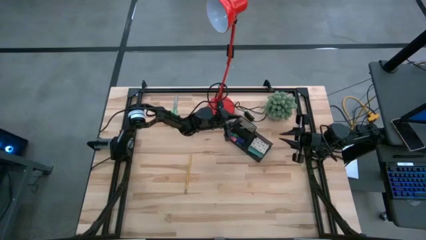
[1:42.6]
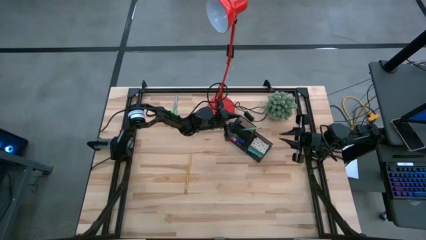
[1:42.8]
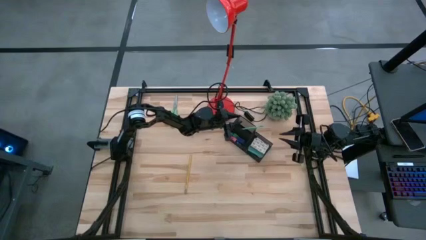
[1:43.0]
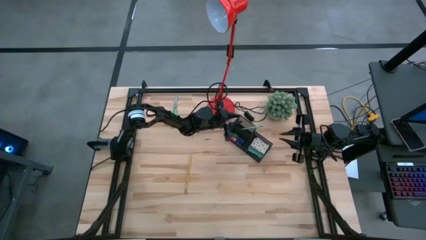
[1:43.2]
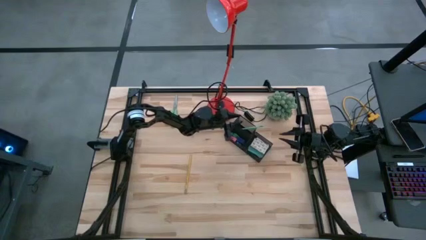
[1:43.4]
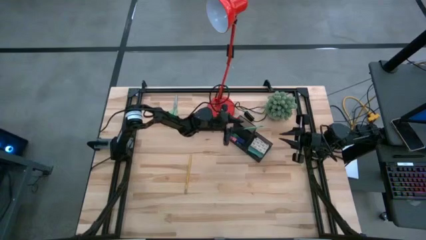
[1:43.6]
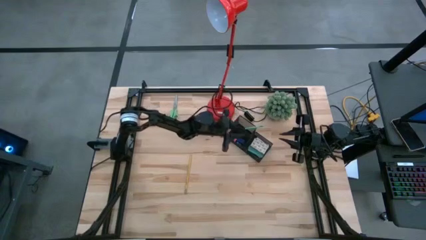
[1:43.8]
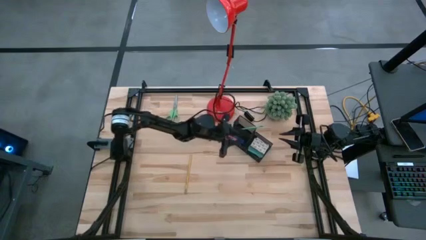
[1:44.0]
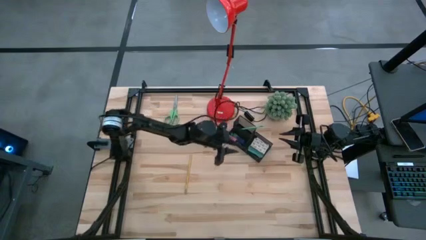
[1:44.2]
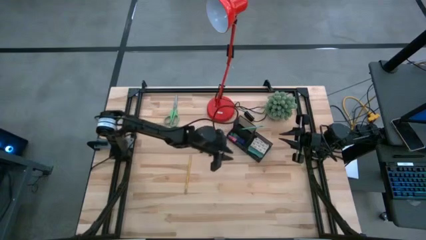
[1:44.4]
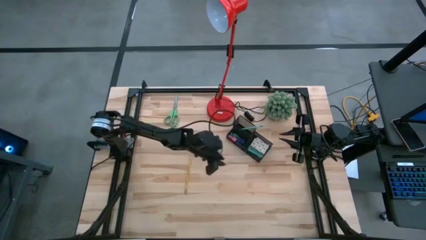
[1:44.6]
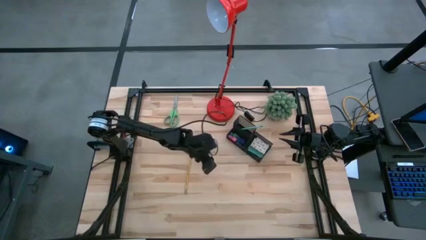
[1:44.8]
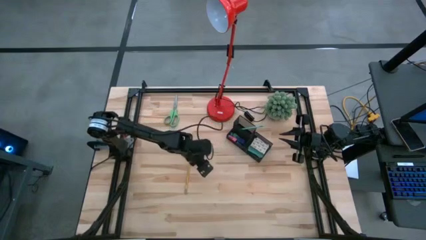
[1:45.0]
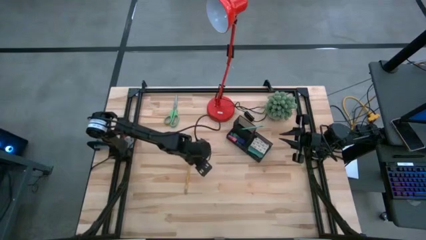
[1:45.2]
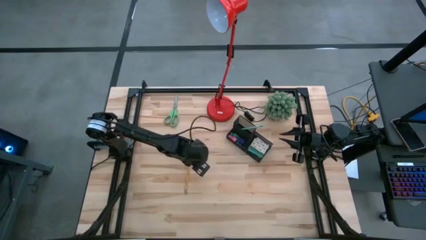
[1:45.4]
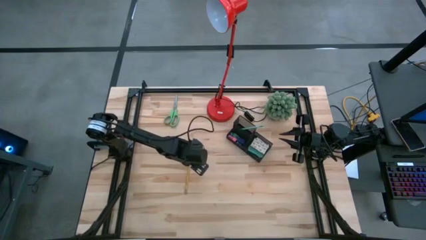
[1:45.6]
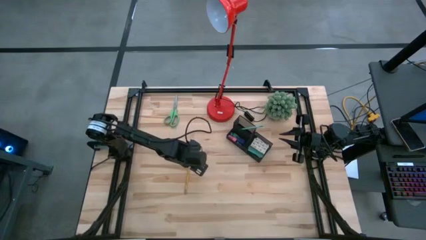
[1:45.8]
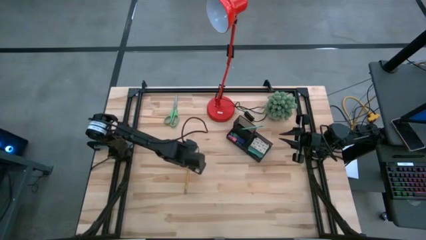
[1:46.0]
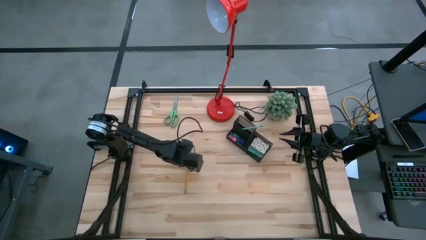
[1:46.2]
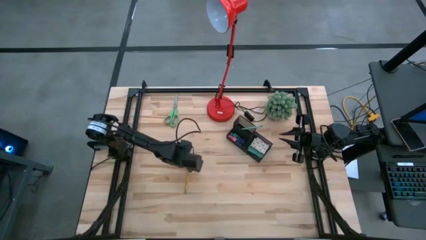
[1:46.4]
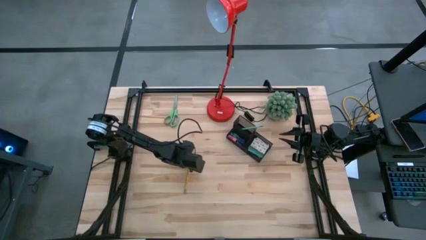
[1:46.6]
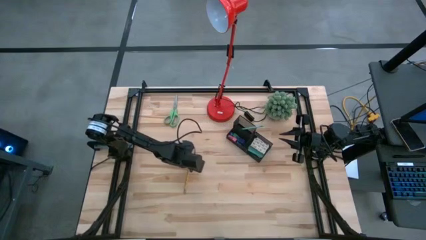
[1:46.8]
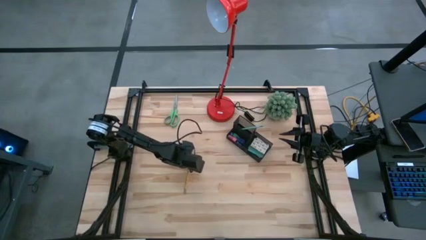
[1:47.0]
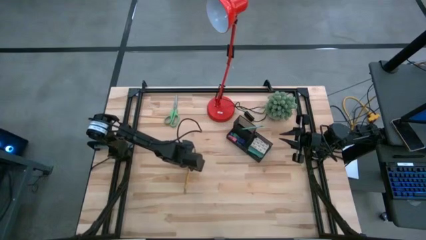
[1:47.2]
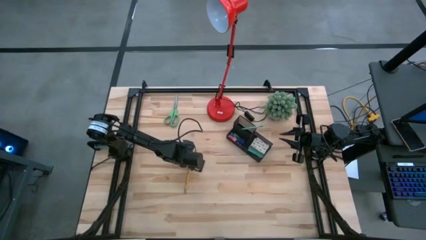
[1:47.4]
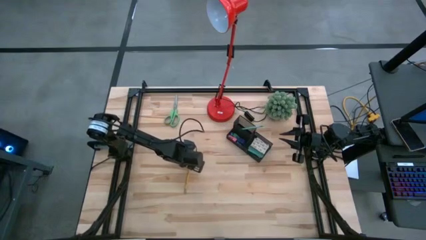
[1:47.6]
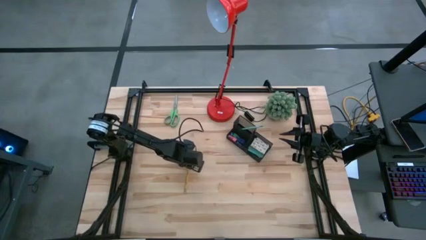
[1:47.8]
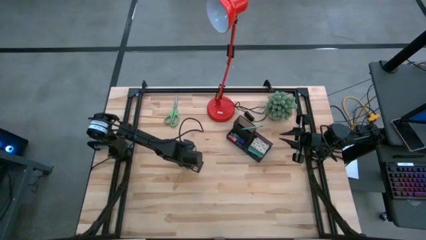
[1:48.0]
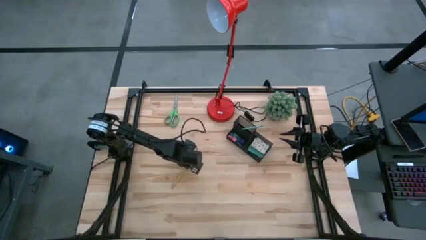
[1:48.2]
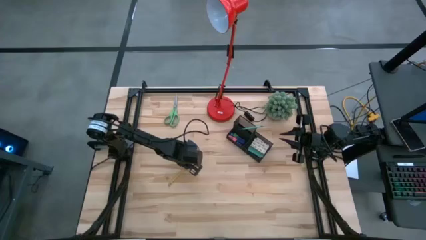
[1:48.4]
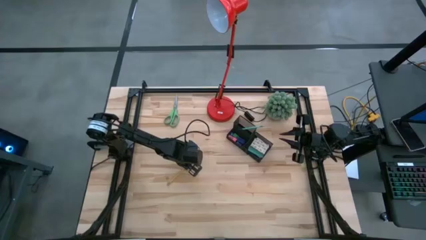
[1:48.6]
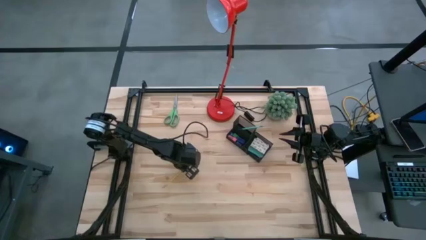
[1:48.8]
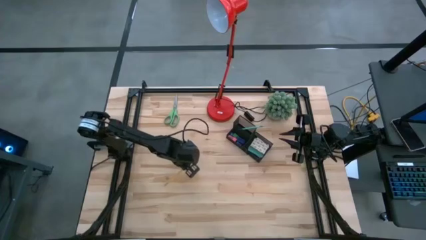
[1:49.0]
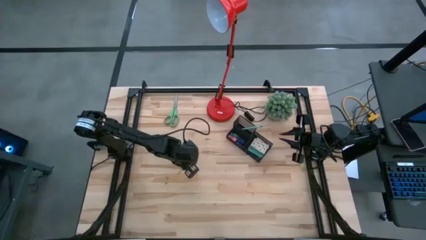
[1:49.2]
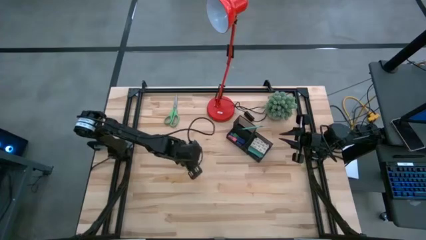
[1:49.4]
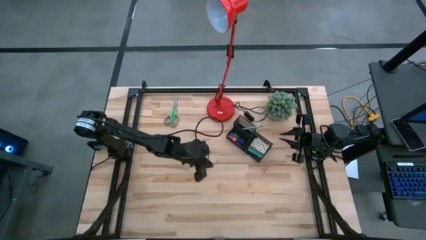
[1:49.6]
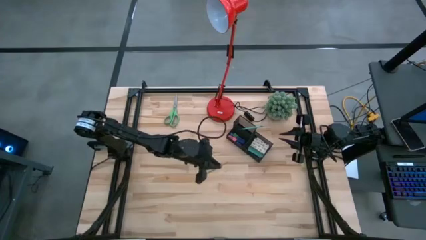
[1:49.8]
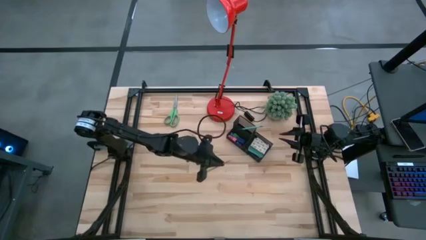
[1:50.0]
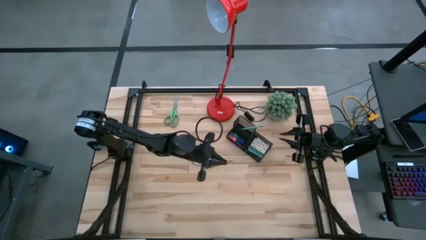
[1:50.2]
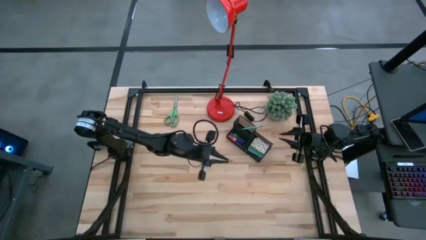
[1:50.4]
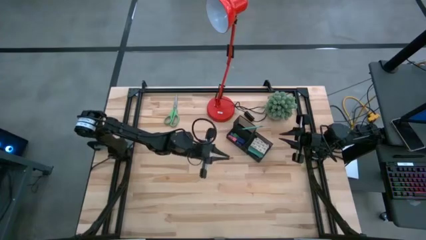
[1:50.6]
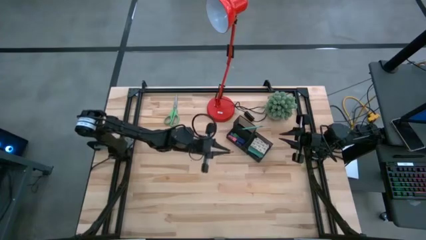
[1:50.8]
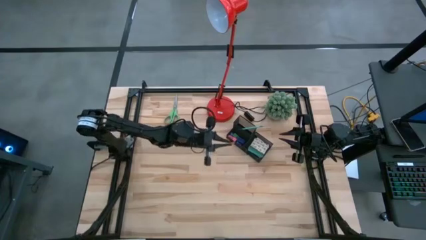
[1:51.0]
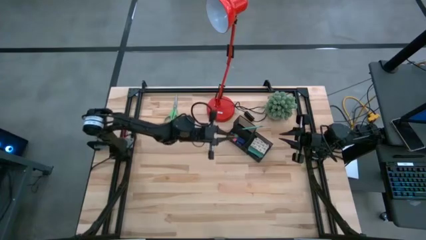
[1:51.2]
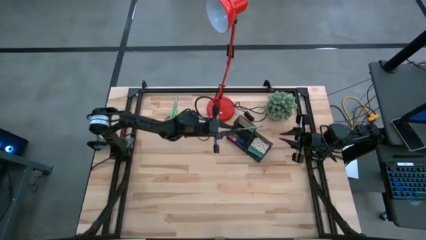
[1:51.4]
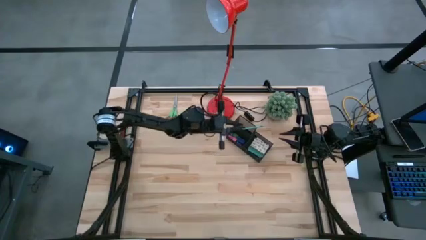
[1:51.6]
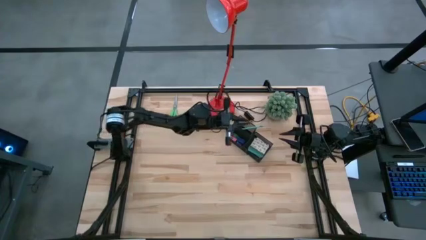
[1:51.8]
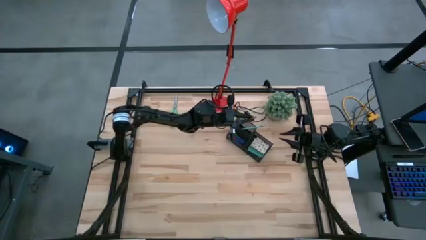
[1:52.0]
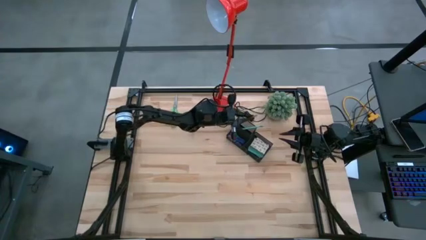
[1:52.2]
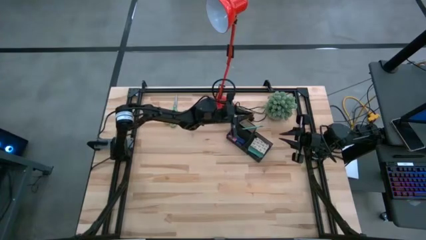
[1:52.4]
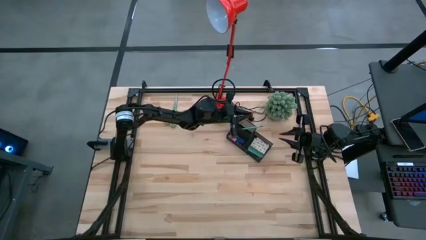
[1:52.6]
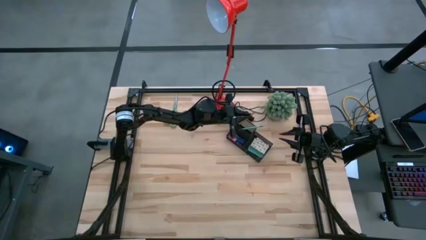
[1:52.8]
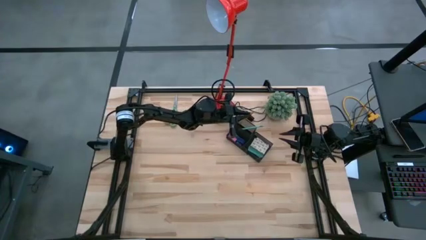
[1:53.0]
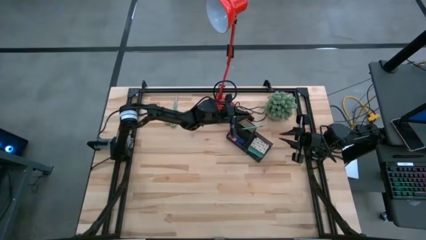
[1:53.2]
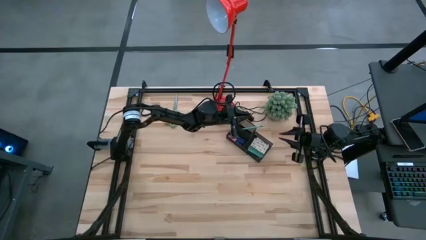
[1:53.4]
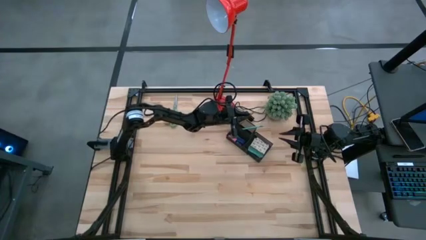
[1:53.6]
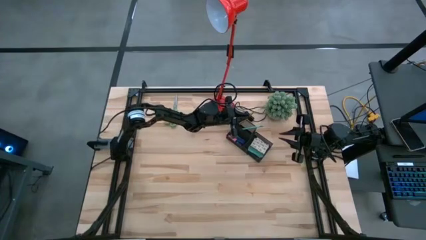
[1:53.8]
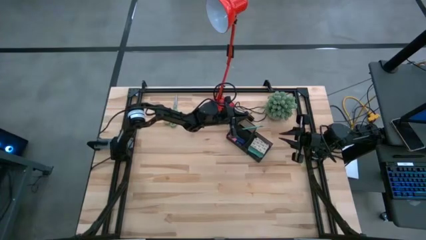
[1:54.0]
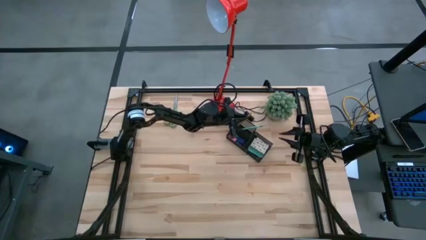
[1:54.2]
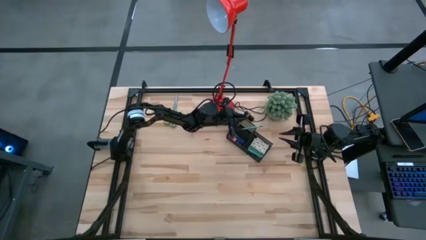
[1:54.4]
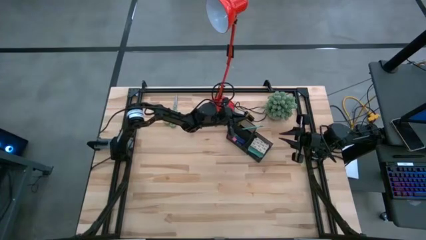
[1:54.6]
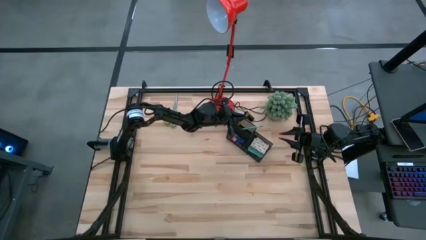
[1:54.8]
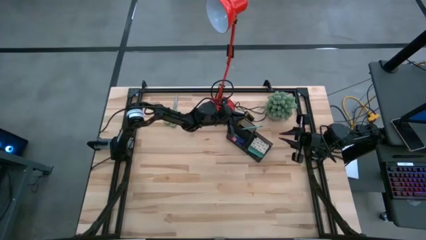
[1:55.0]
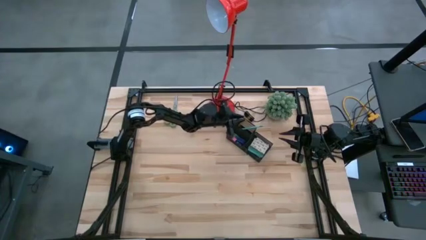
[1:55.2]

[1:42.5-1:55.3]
Task: Pick and place office supplies into organizer
Put the yellow pencil into the desk organizer

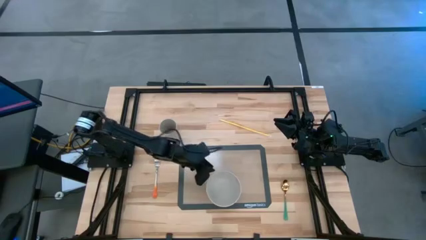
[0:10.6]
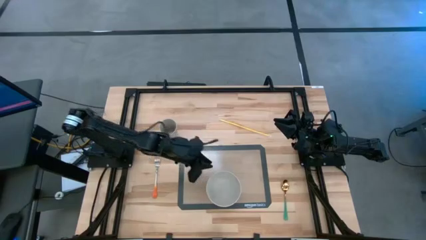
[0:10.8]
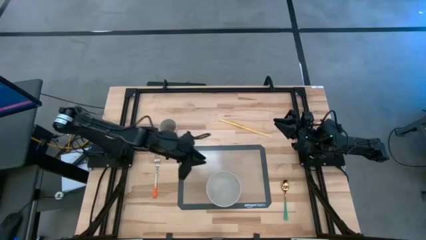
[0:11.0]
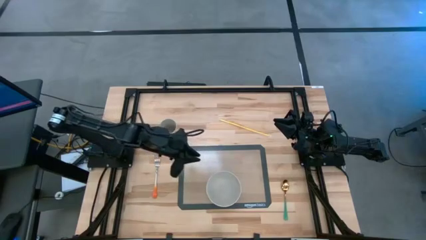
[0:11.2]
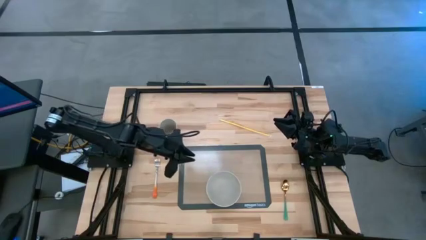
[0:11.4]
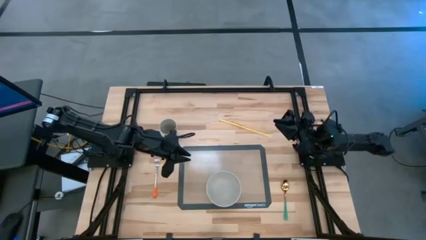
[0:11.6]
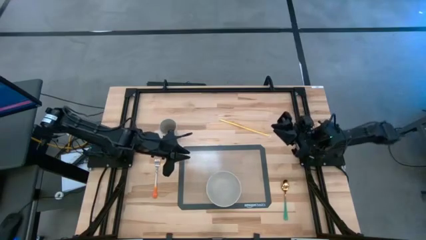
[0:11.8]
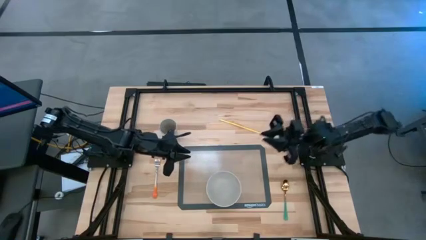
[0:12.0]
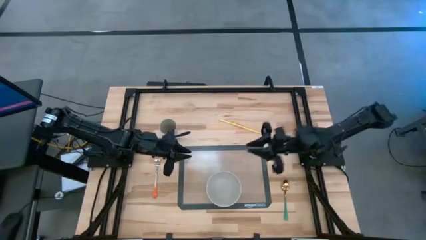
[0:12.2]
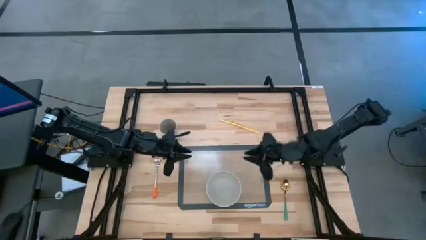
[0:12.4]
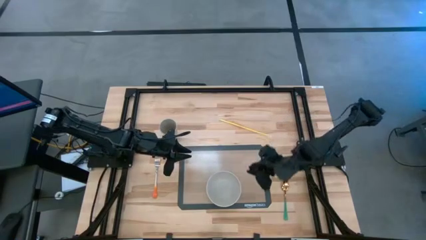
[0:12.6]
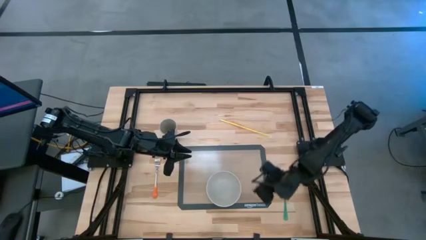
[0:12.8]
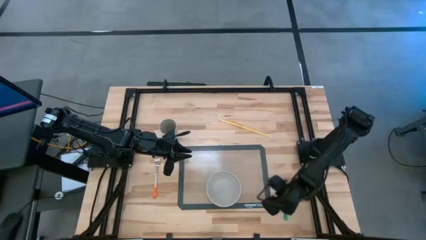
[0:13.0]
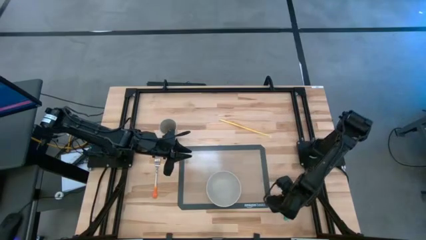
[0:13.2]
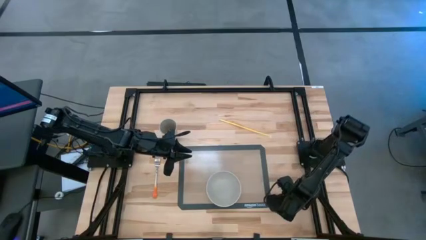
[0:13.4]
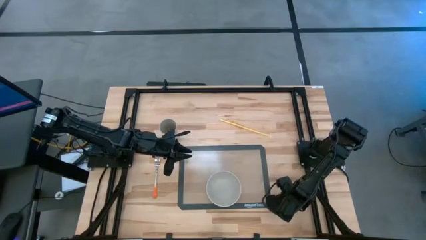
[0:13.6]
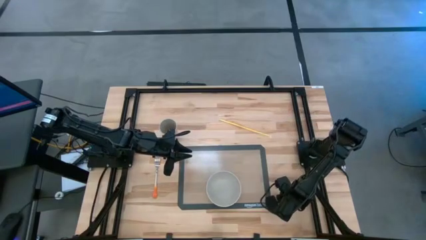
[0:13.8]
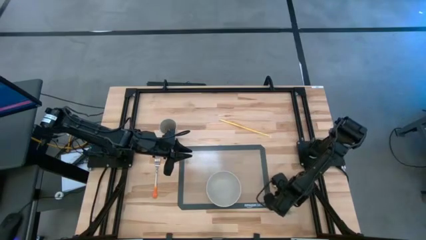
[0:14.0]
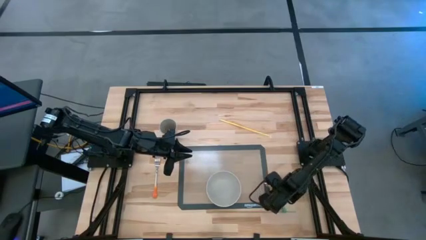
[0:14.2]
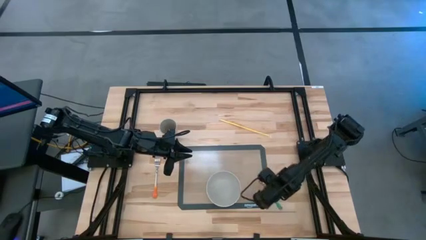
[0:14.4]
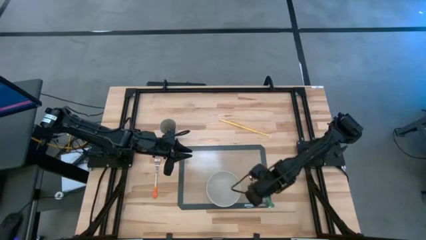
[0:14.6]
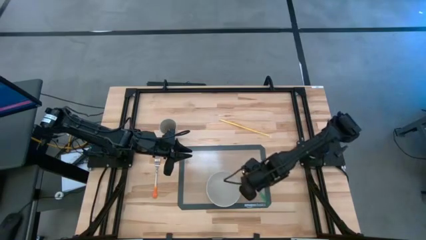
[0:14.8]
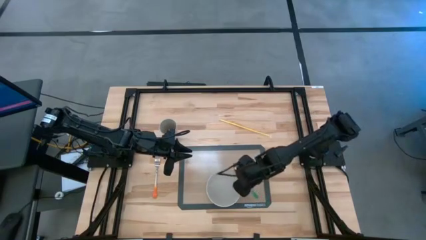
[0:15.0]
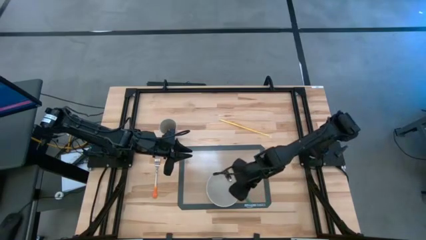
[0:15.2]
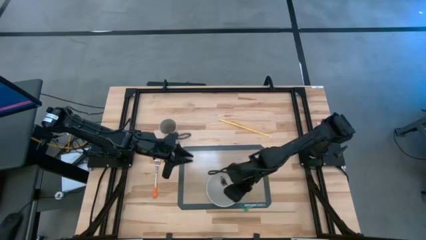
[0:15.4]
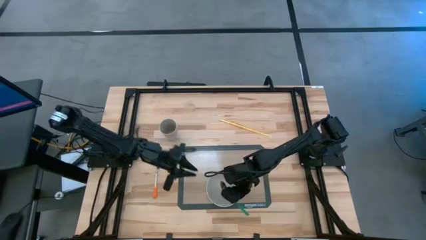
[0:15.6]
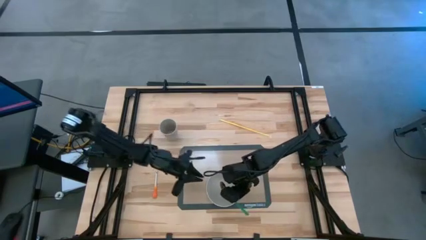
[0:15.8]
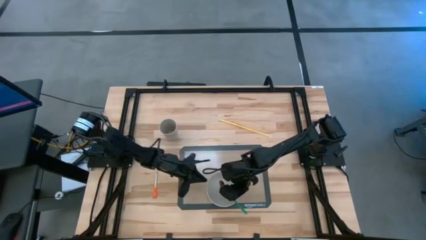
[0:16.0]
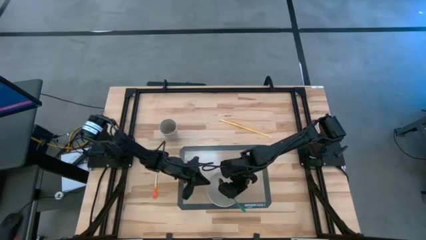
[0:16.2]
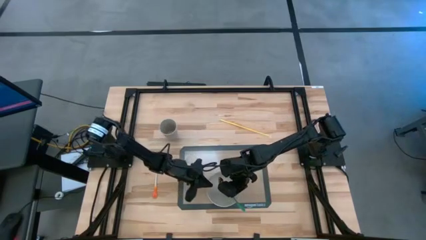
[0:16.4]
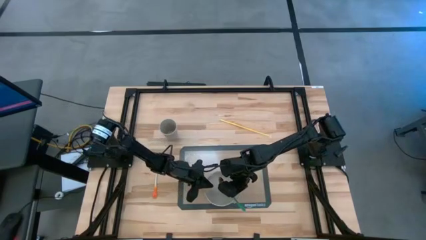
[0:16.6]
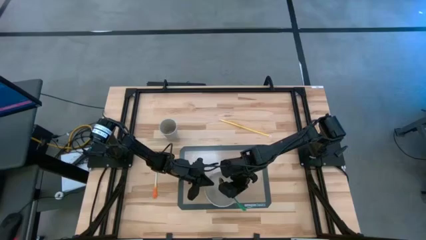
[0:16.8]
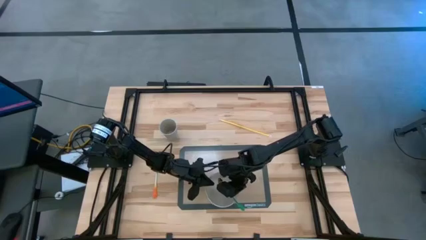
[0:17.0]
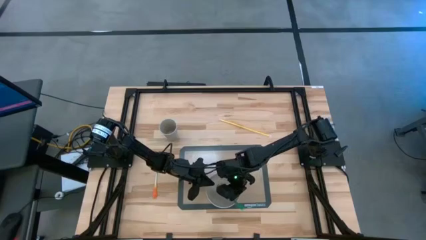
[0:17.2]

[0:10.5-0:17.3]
Task: Pick & Place Utensil
Put the spoon into the bowl on the silicone mat
